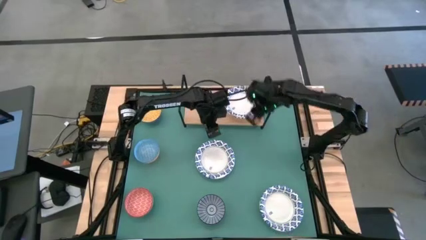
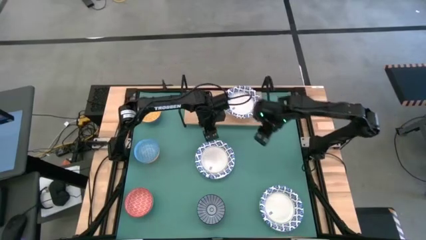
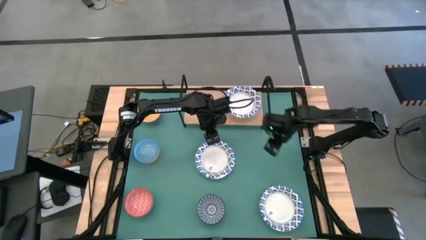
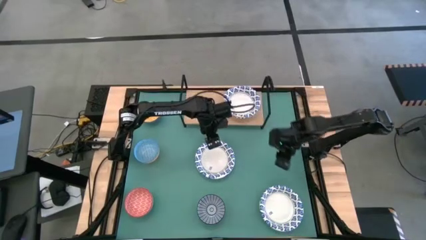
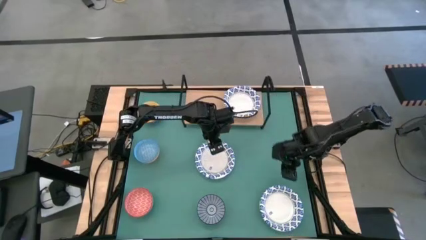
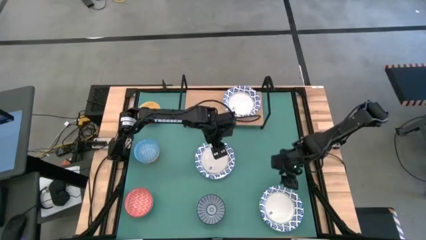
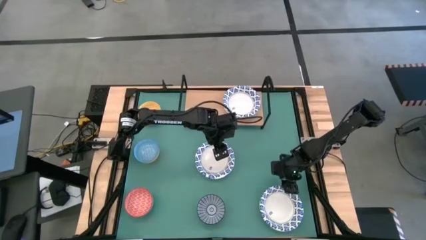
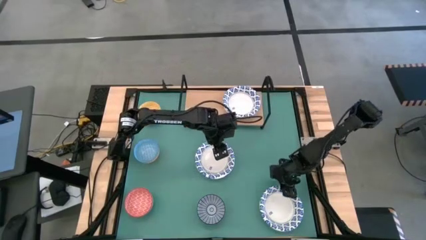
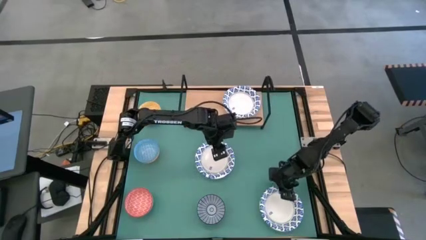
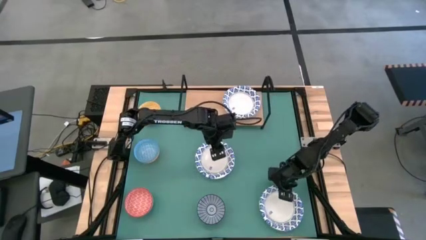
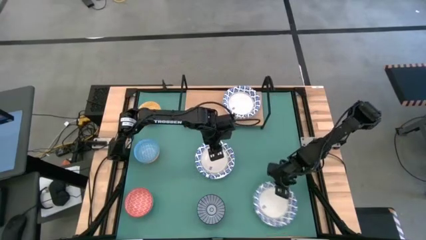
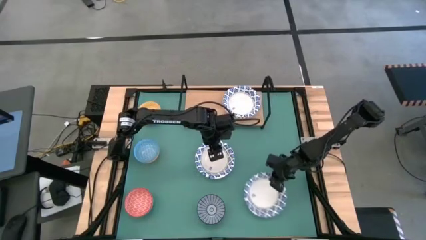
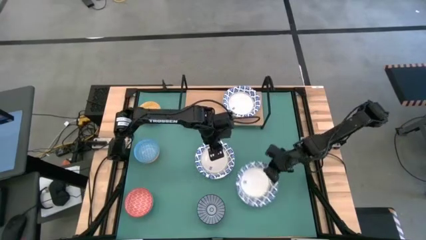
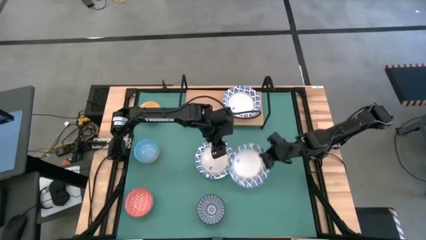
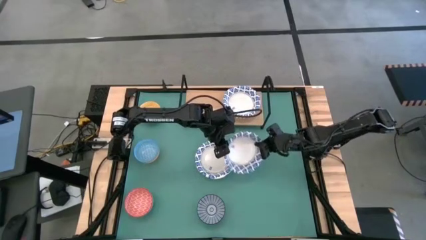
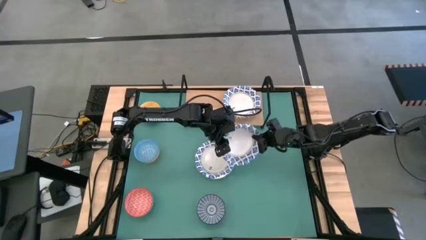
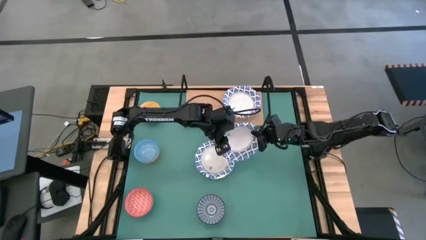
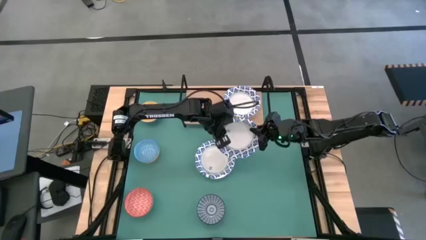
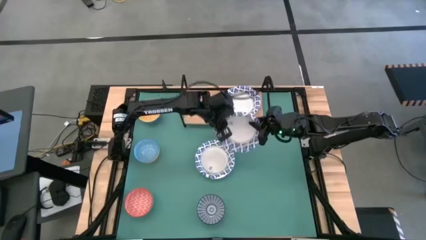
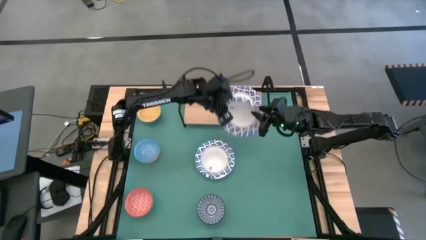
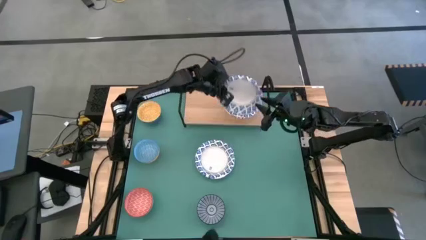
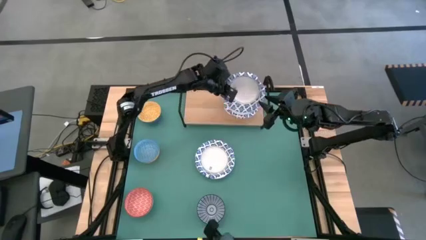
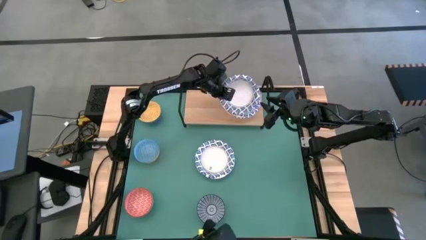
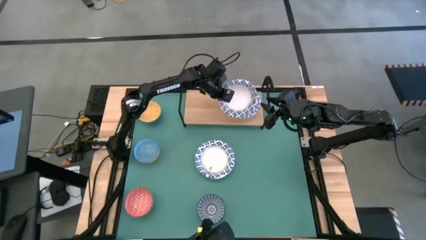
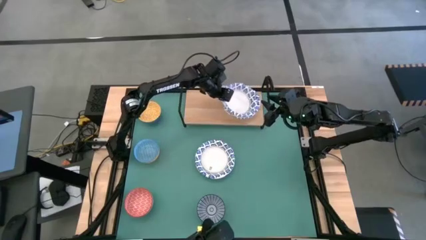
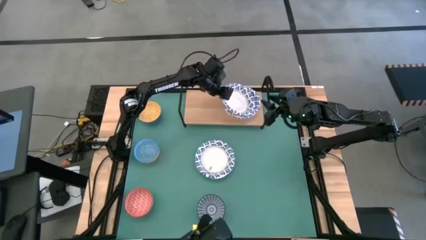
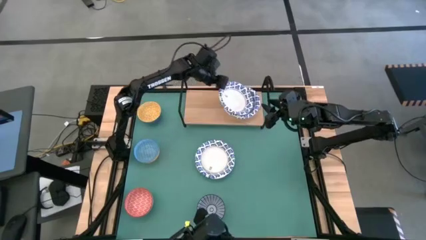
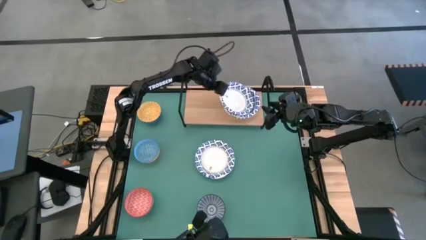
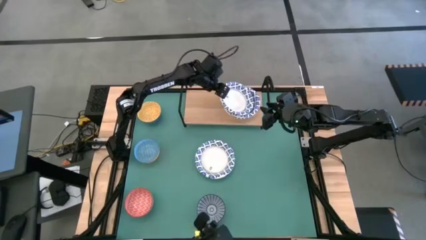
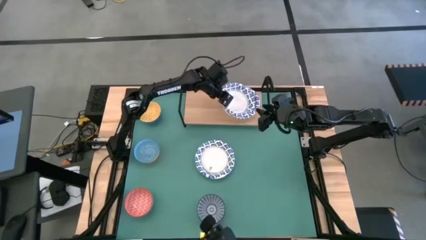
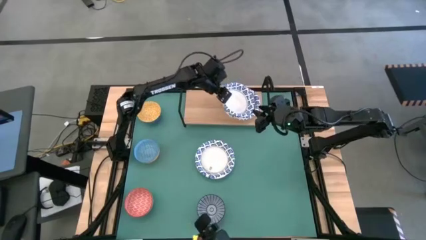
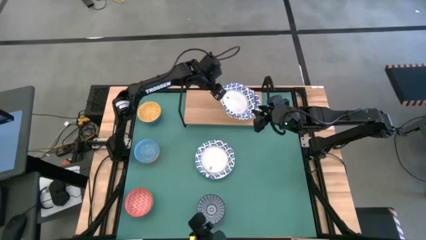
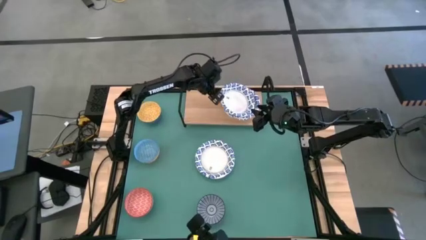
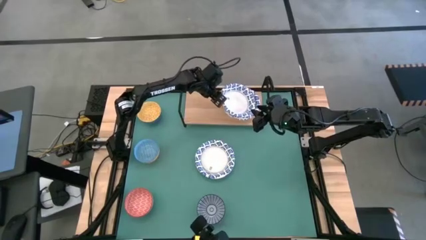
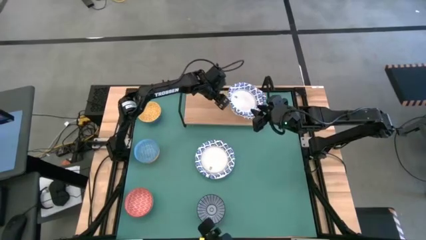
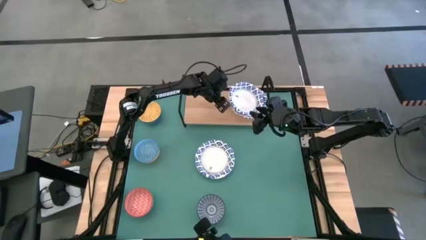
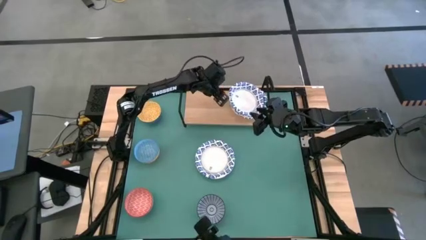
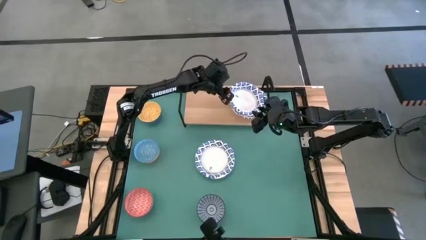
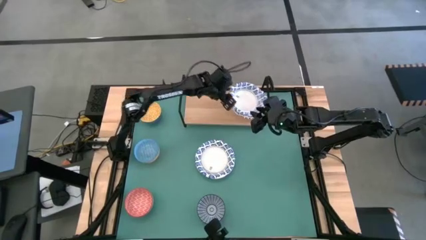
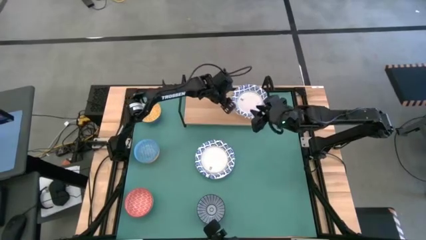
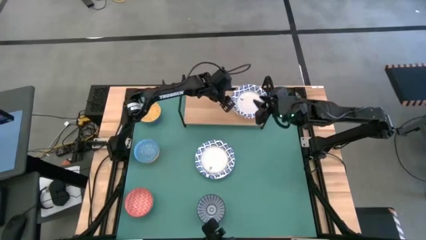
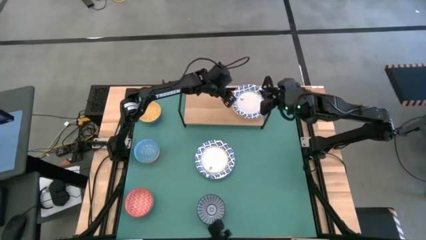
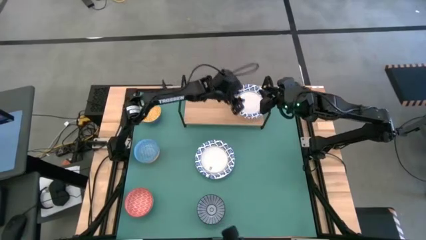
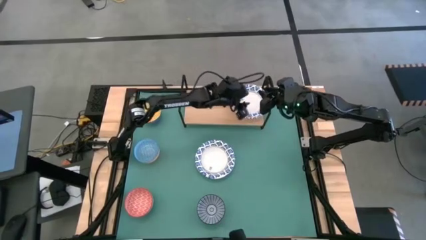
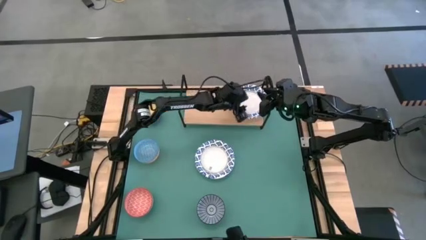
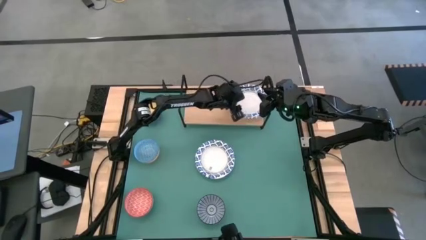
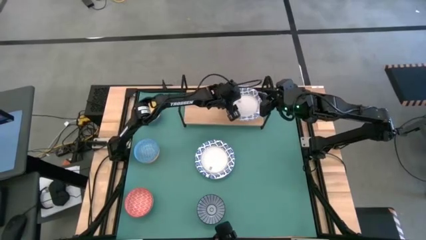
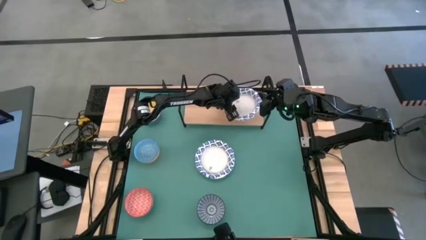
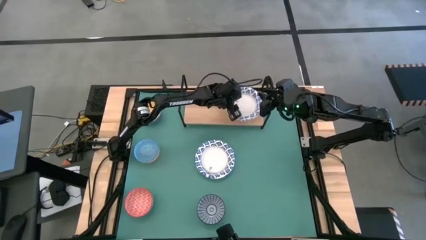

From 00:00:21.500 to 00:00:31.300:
Task: Place and stack bowls onto a shelf
Stack the bottom blue and white bowl on the blue and white bowl on the shelf

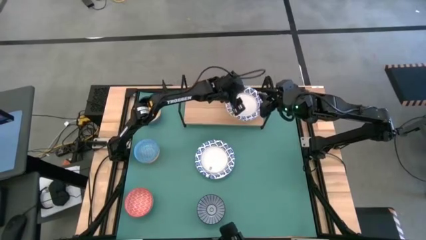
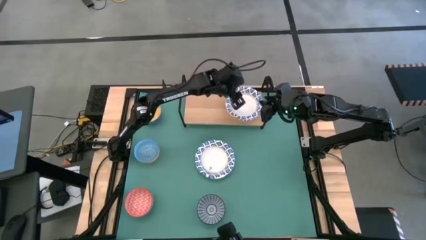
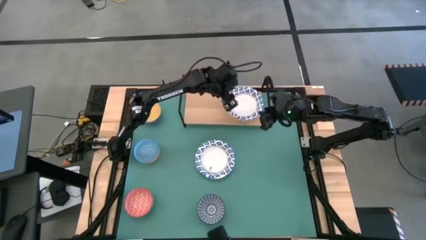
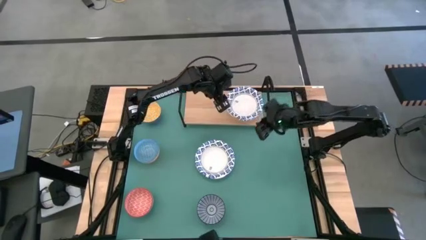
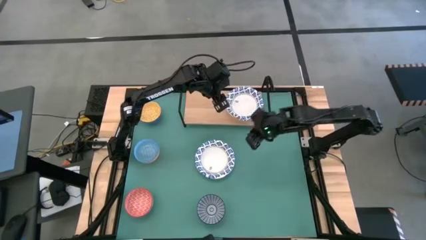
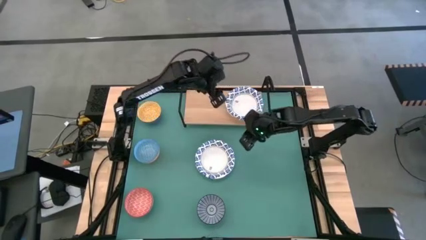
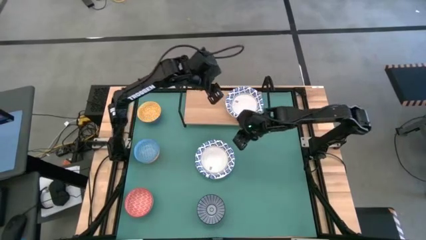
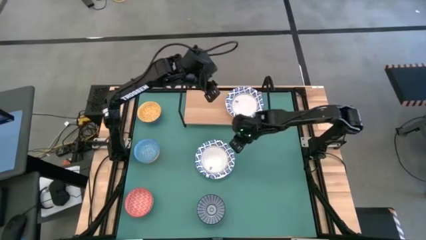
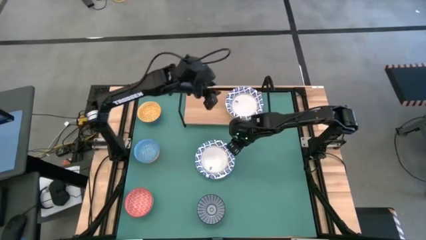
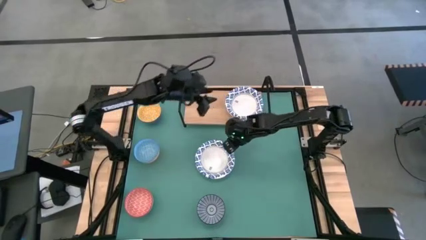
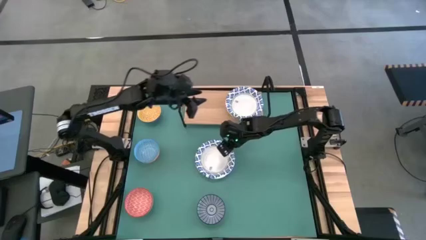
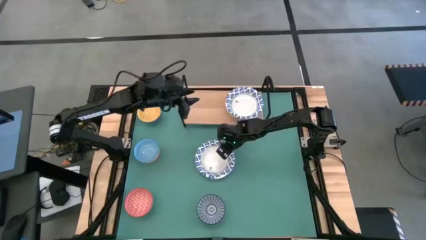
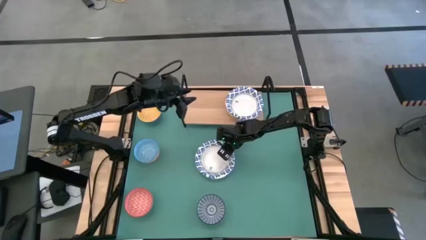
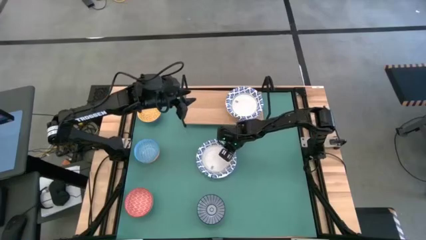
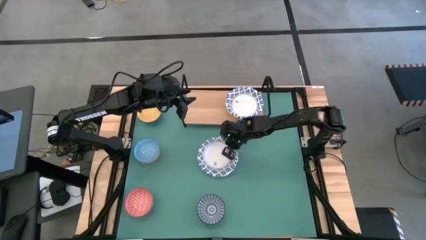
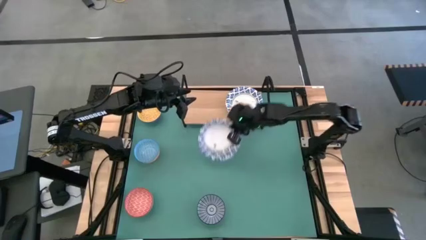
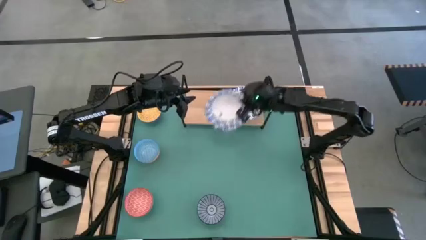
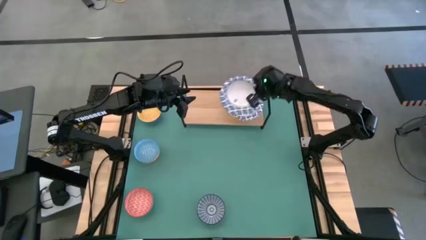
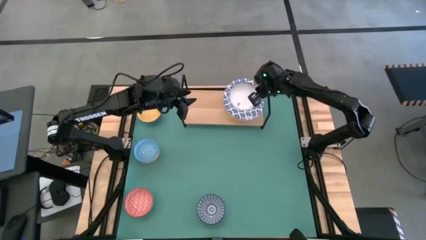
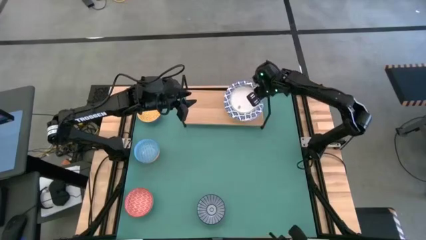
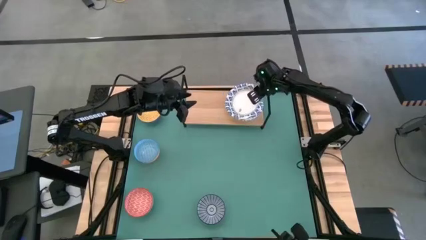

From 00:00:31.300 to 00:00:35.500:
Stack the blue and white bowl on the blue and white bowl on the shelf

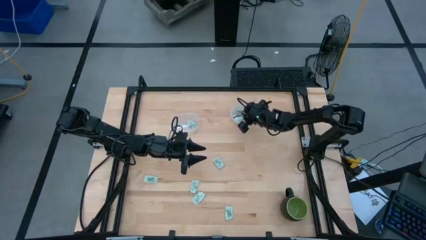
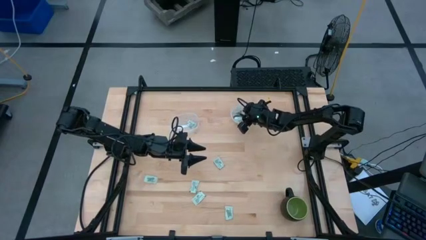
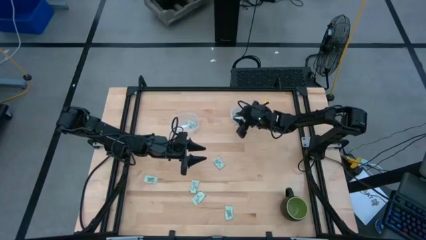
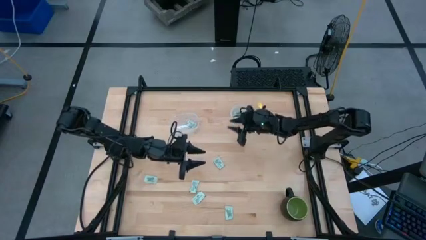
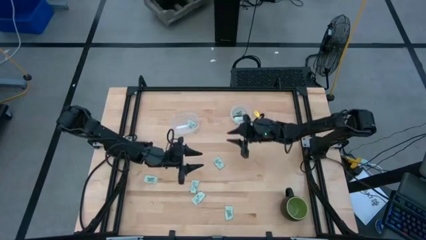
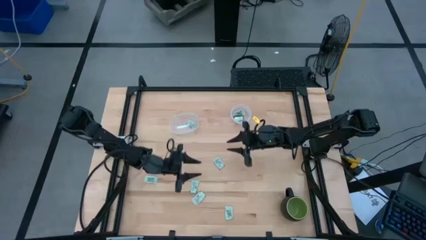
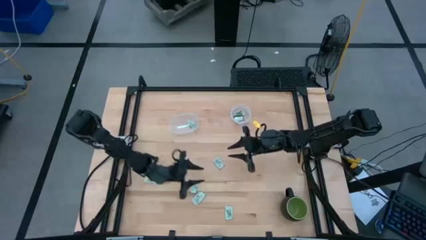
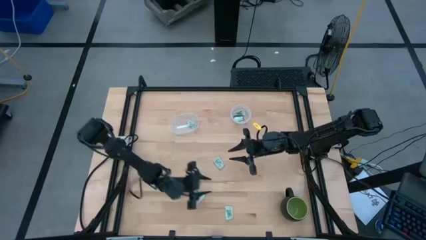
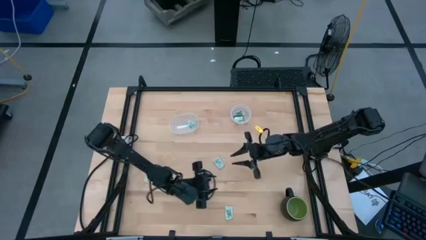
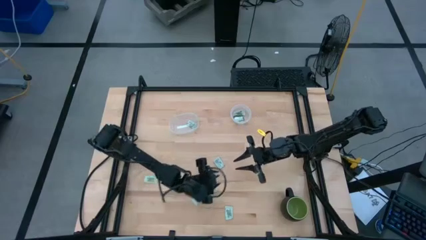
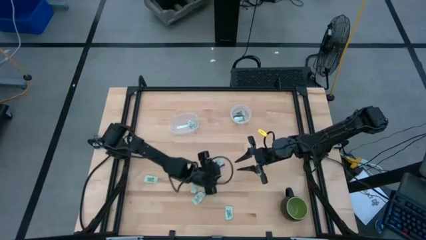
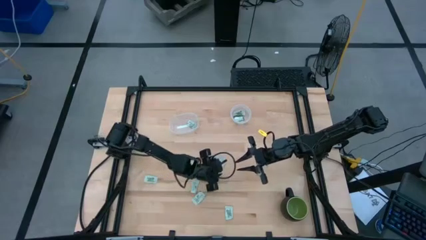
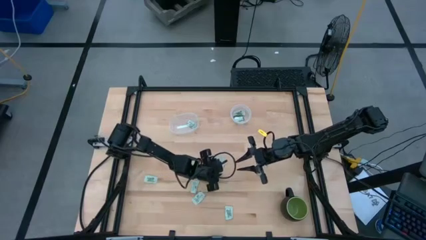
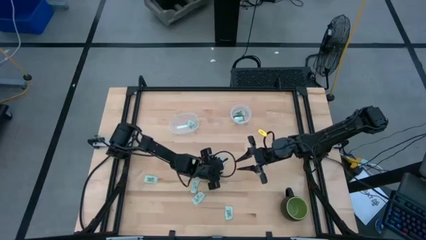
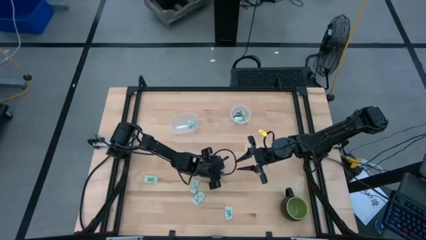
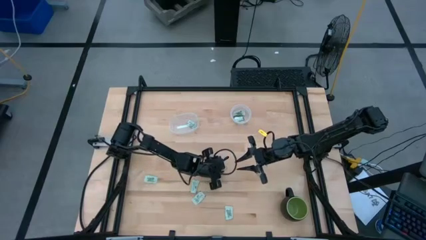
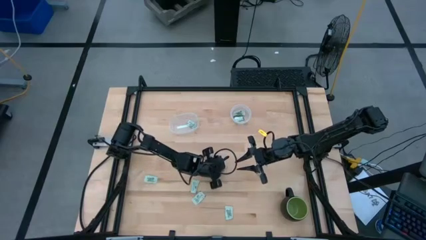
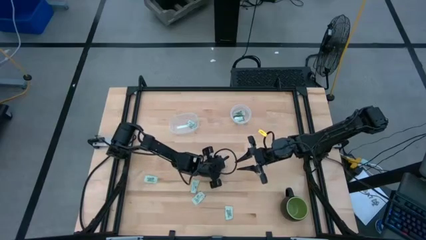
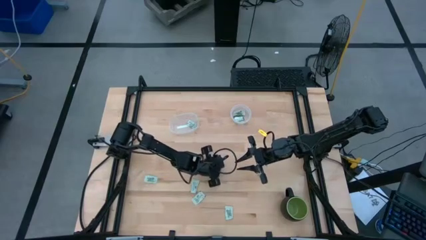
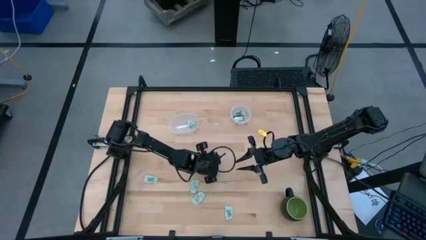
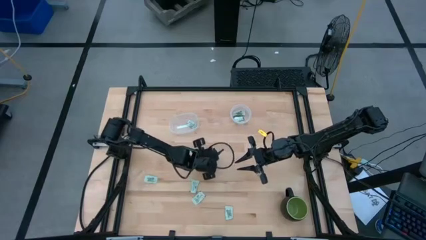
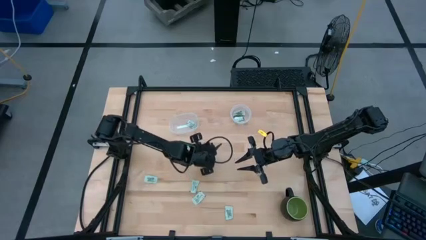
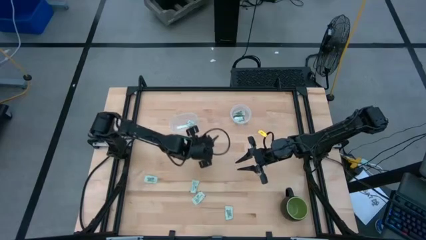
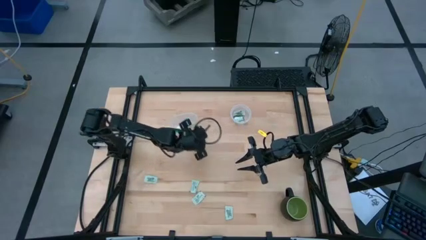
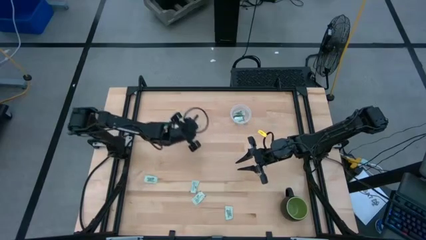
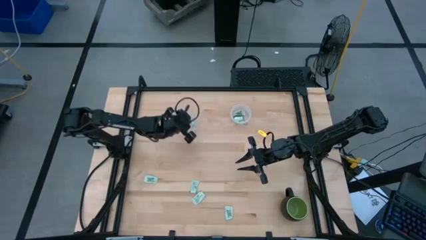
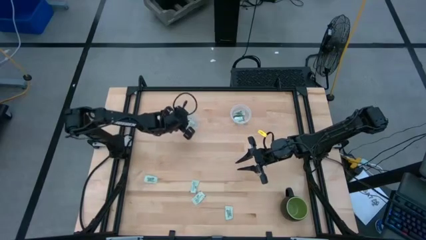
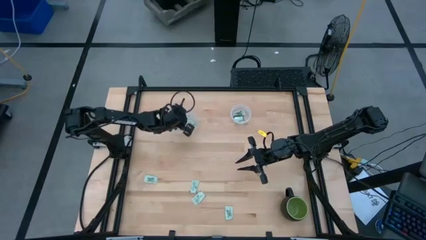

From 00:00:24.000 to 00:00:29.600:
Task: Pick and place Stevia / Truvia into bins
Put the stevia packet into the left transparent container
